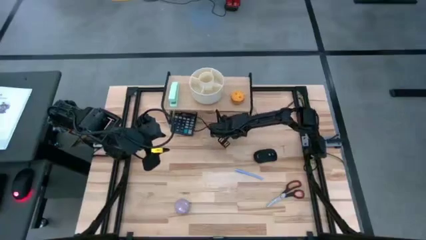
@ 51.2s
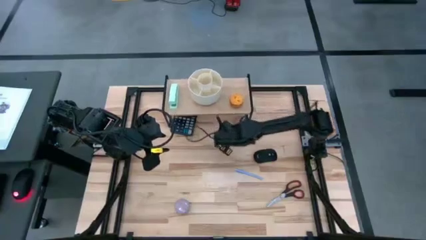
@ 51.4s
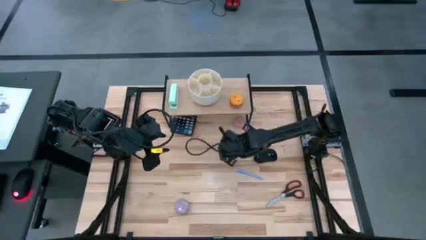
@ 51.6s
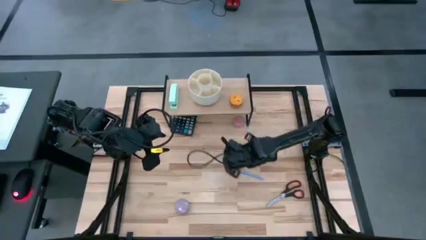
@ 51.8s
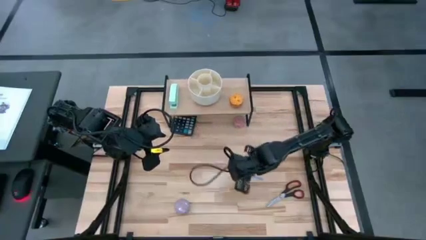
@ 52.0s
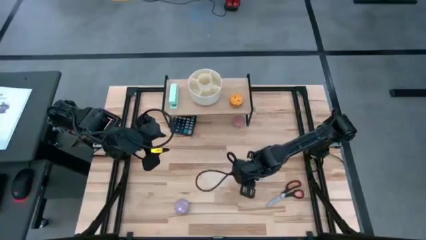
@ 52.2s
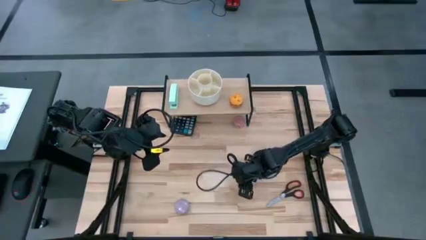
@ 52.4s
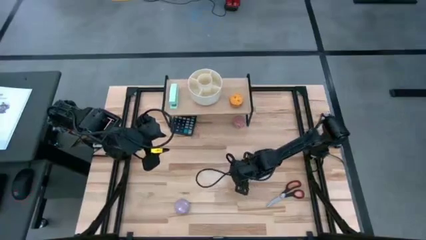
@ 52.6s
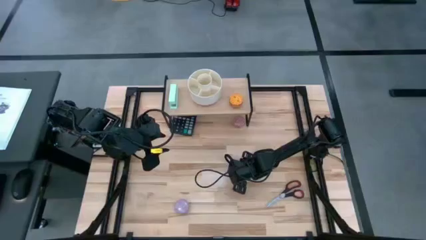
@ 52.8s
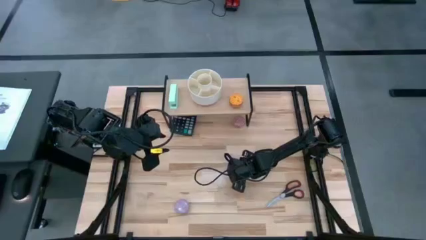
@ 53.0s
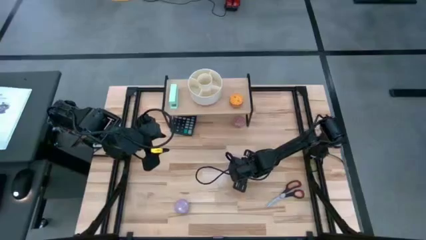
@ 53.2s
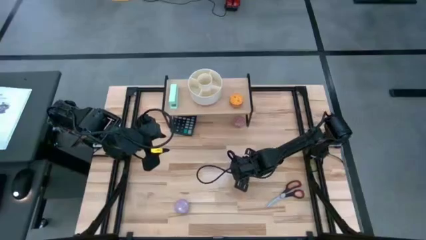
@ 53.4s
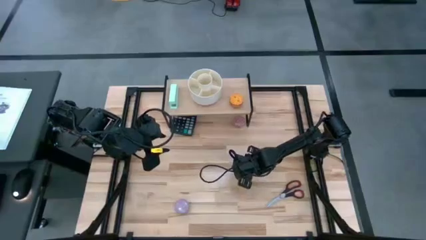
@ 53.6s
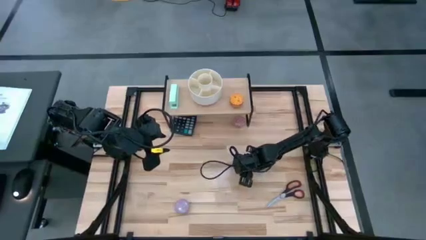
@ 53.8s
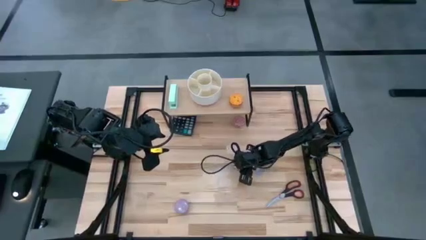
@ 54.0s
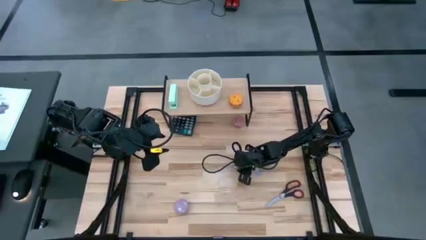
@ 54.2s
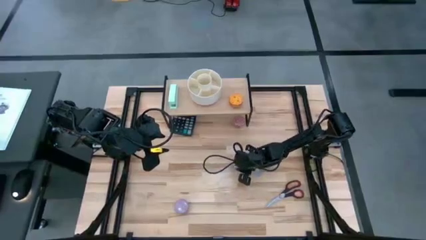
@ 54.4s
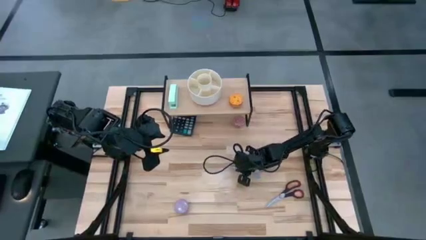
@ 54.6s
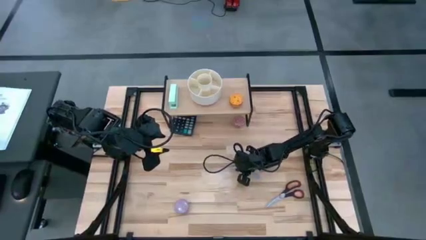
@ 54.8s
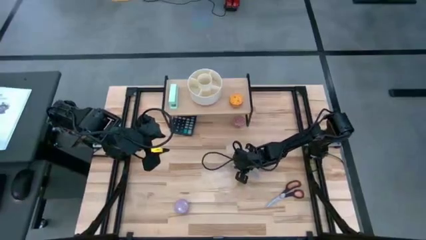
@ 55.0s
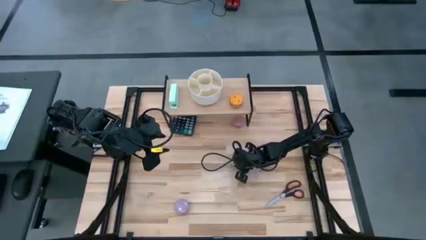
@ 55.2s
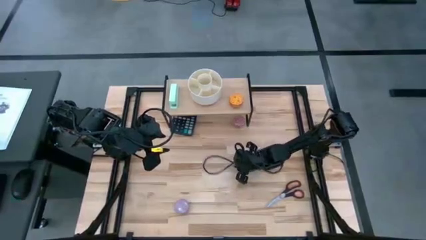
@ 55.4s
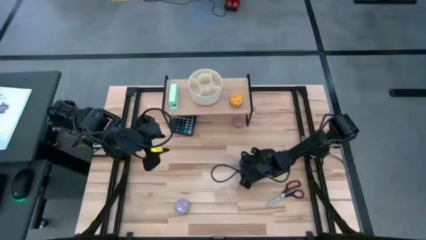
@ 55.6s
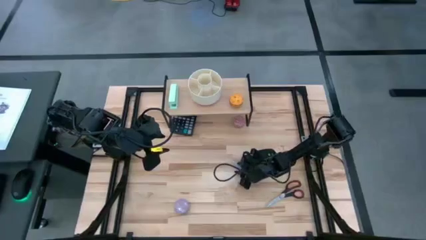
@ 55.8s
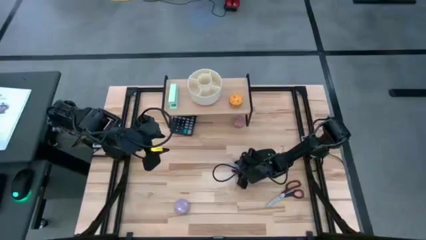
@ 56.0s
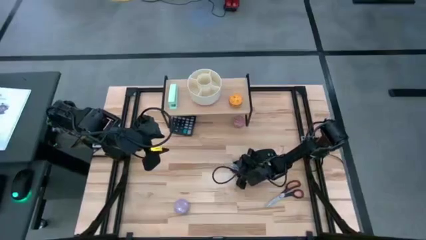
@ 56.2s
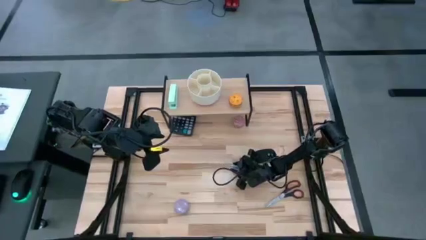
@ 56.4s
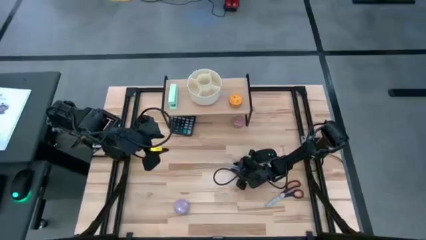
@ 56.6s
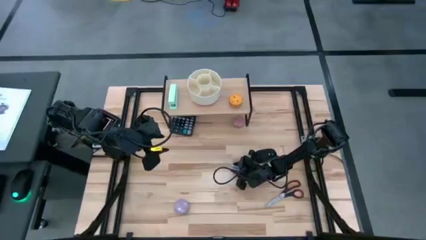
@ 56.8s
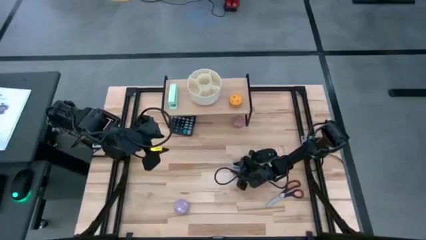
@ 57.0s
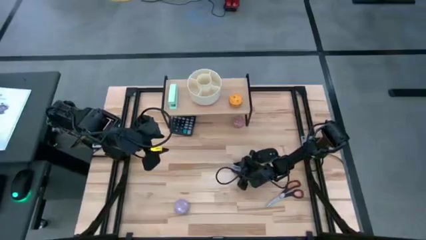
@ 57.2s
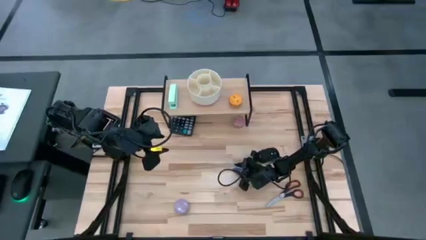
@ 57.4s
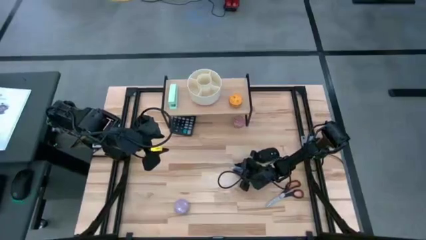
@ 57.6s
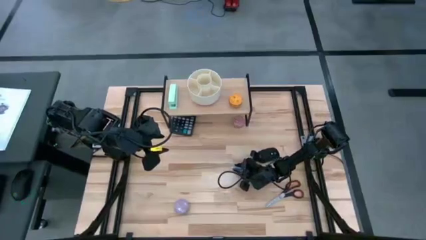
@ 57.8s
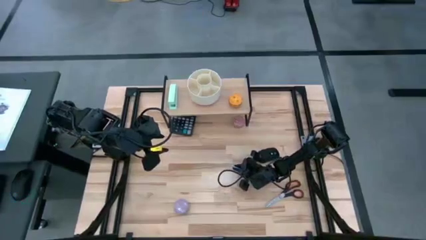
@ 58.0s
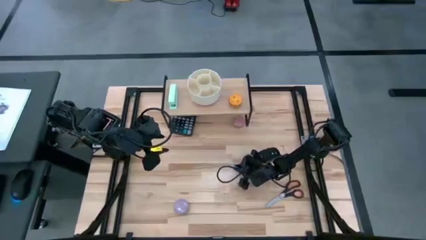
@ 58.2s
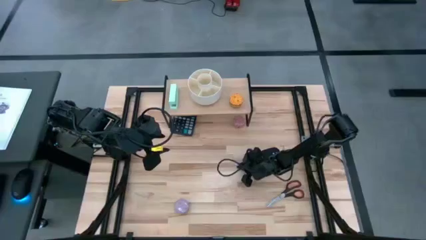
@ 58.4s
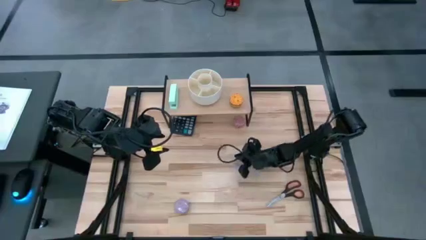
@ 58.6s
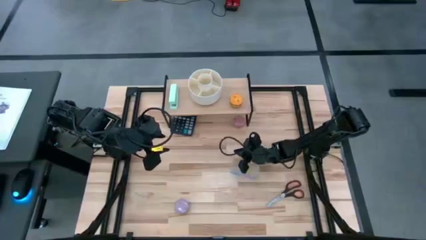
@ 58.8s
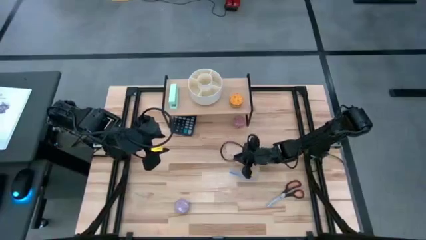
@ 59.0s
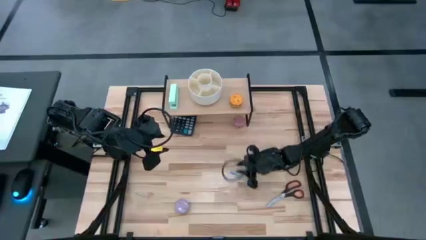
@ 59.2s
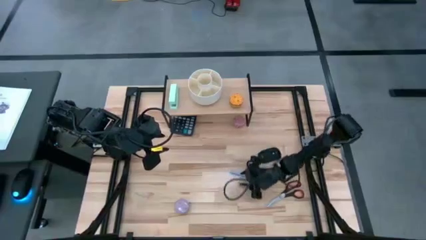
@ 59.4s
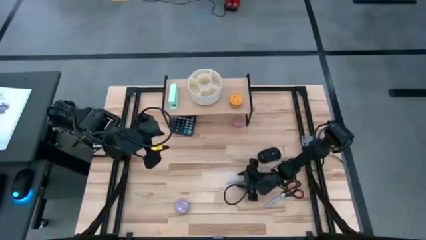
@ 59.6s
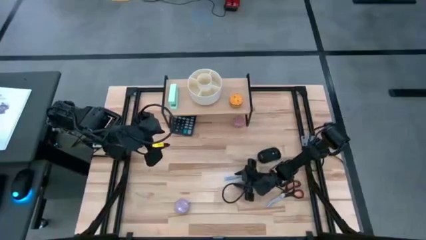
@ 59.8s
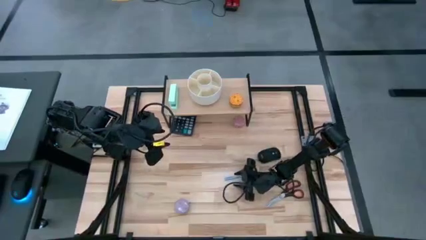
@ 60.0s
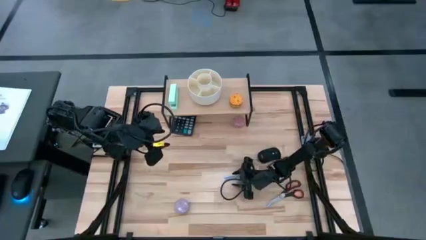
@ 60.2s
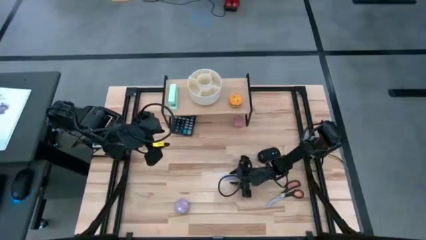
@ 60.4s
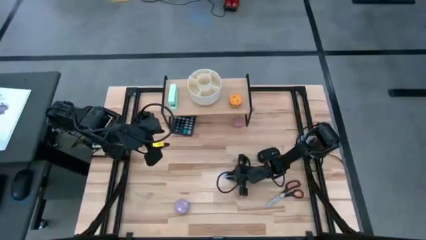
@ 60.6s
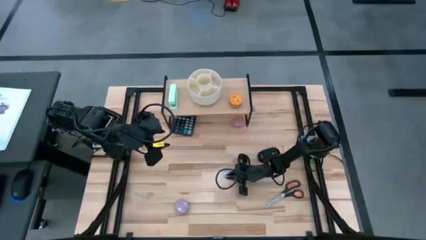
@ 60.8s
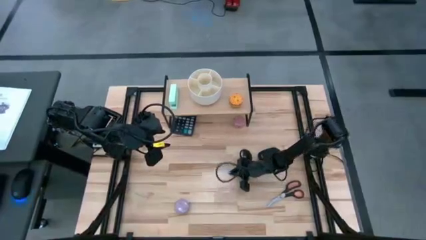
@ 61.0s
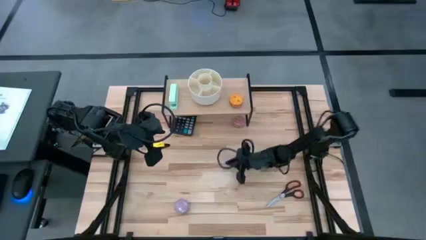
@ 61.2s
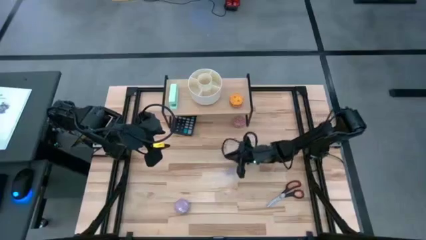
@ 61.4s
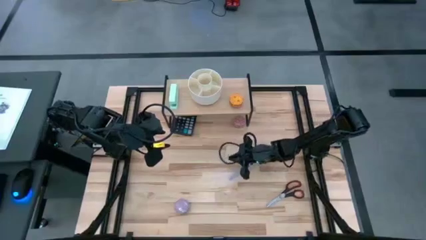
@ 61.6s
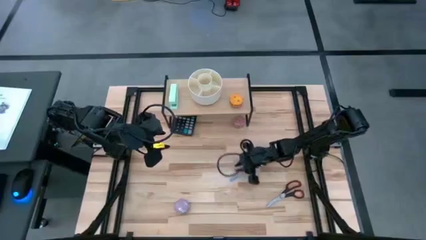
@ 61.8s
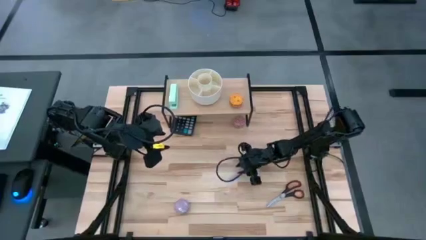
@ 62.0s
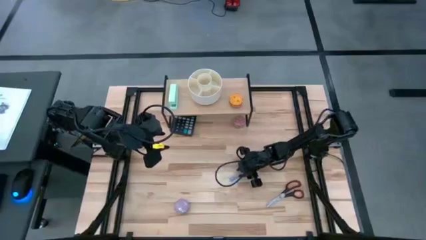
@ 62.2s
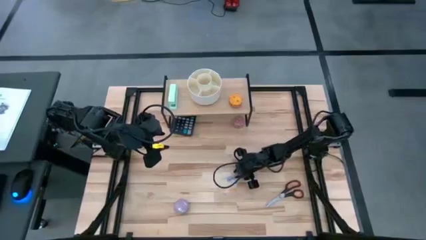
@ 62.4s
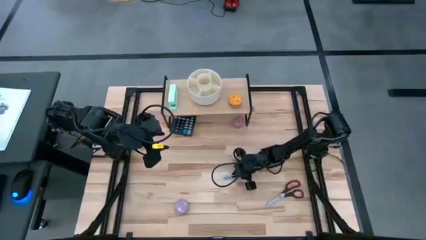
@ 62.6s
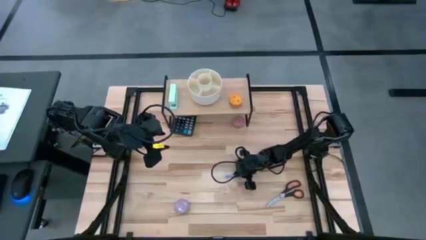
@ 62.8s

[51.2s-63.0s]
Task: Stock shelves
Put the gray pen into the white desk organizer
